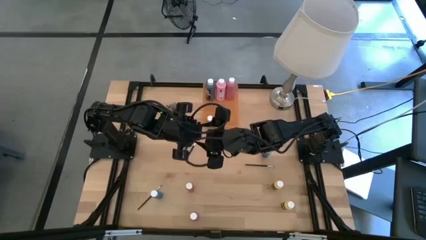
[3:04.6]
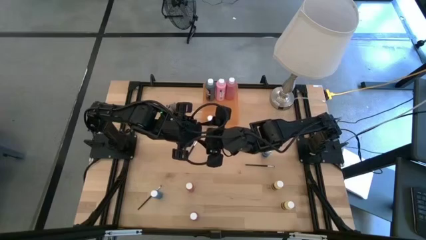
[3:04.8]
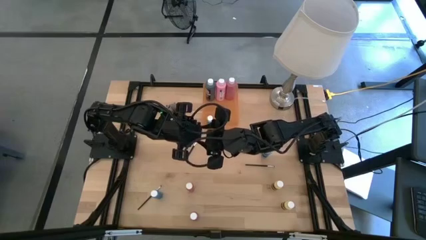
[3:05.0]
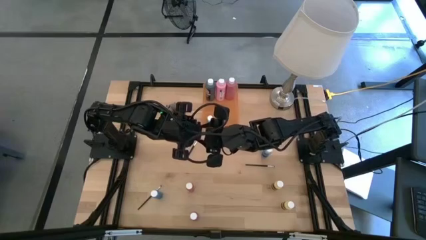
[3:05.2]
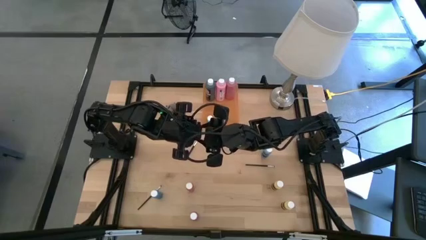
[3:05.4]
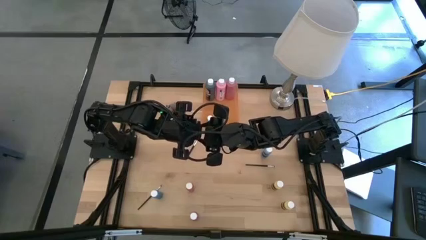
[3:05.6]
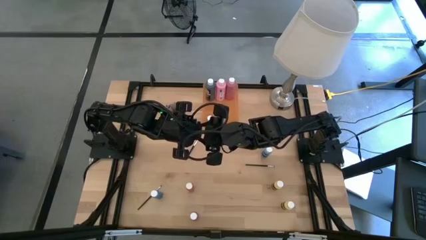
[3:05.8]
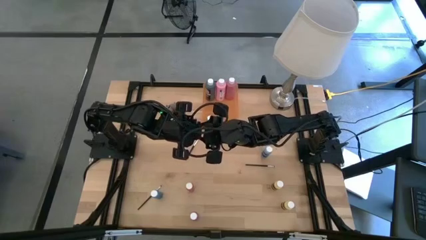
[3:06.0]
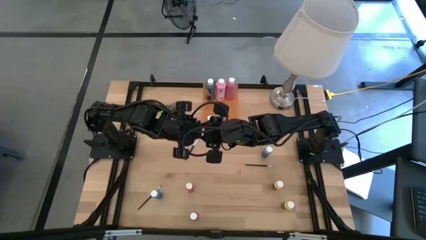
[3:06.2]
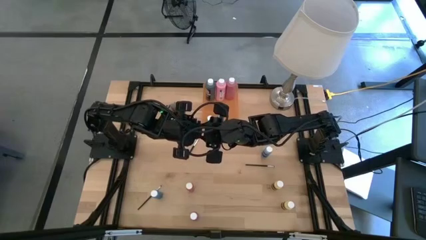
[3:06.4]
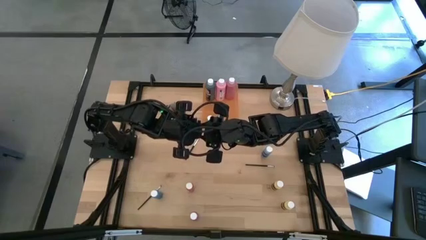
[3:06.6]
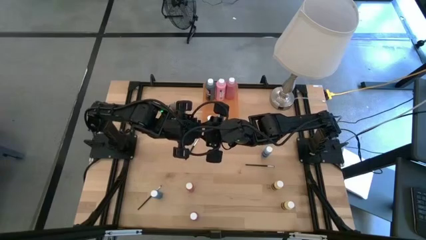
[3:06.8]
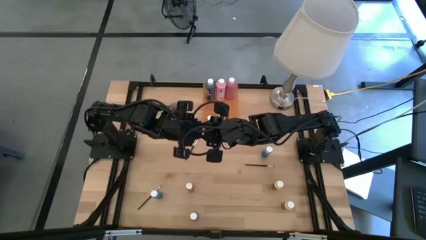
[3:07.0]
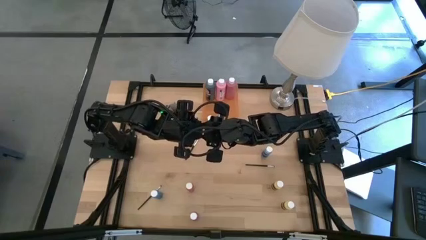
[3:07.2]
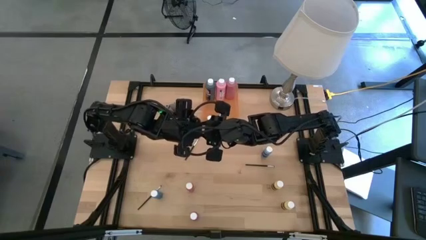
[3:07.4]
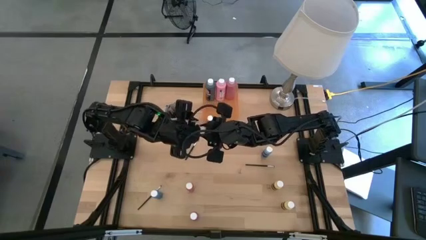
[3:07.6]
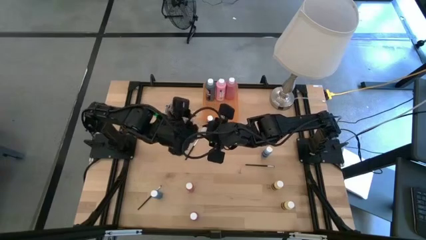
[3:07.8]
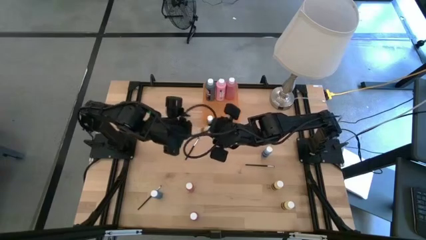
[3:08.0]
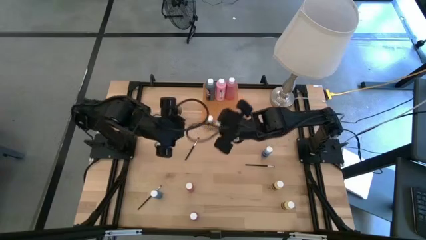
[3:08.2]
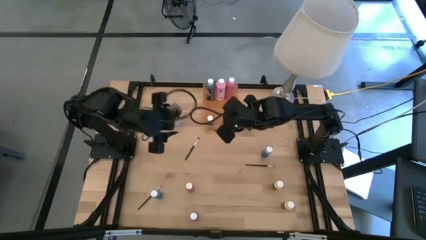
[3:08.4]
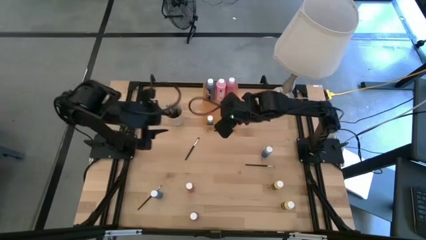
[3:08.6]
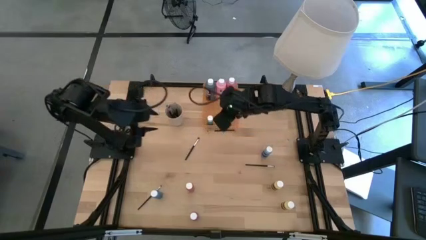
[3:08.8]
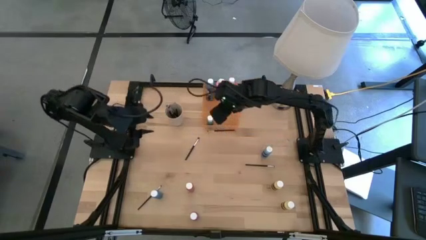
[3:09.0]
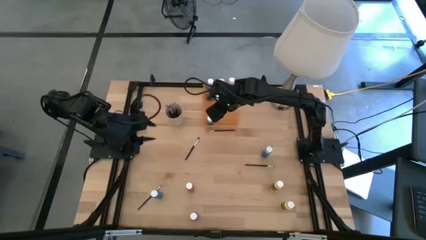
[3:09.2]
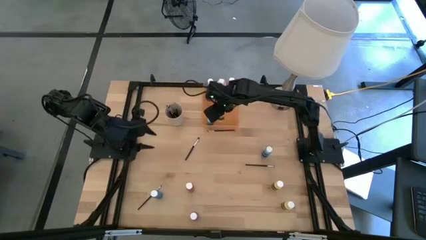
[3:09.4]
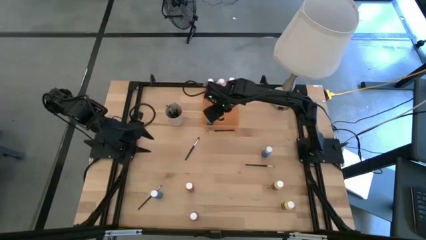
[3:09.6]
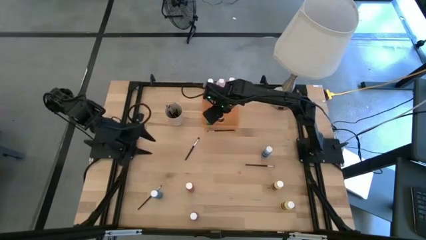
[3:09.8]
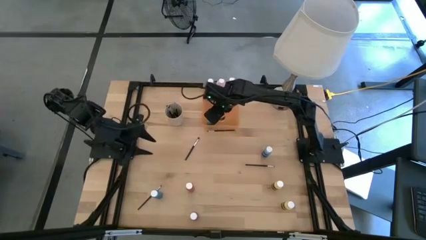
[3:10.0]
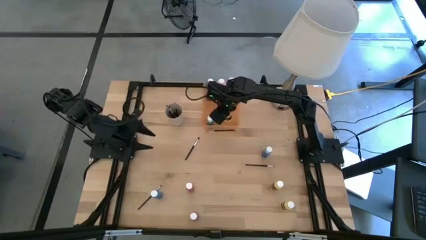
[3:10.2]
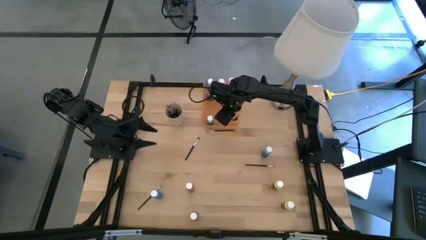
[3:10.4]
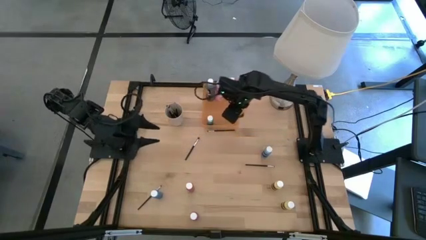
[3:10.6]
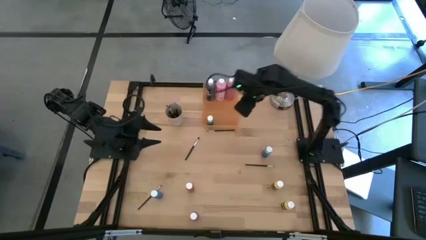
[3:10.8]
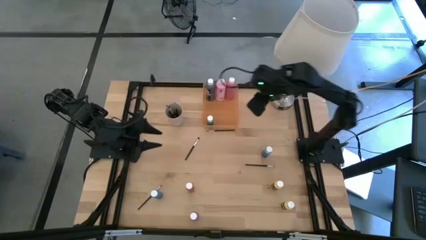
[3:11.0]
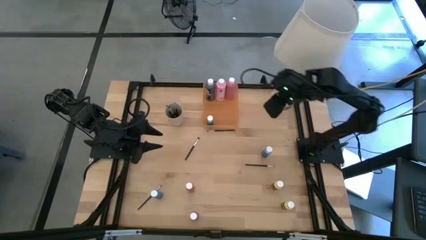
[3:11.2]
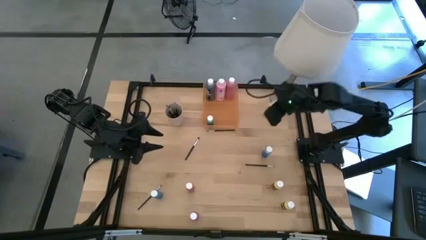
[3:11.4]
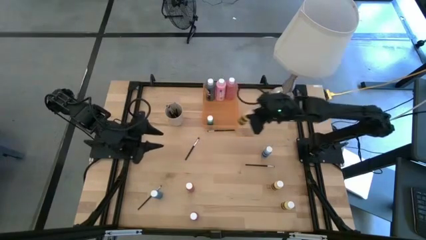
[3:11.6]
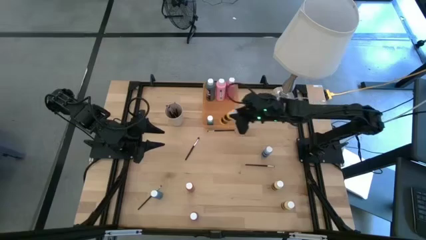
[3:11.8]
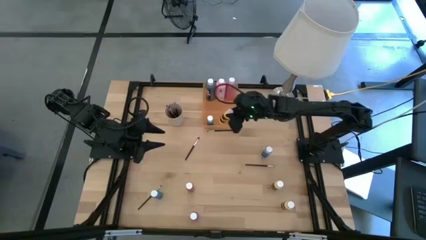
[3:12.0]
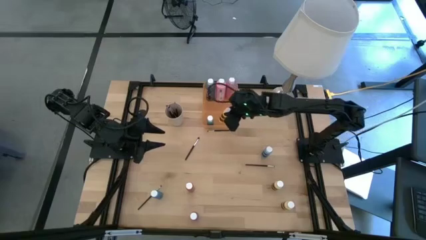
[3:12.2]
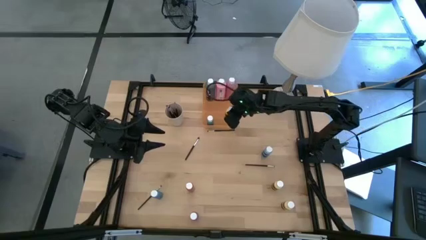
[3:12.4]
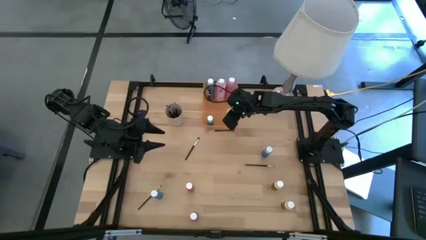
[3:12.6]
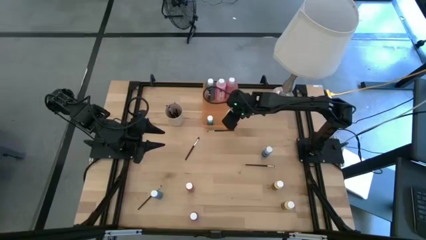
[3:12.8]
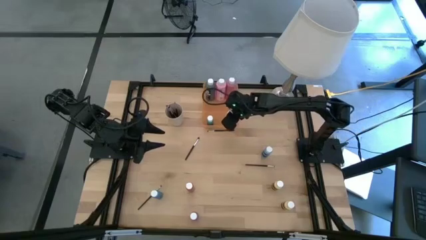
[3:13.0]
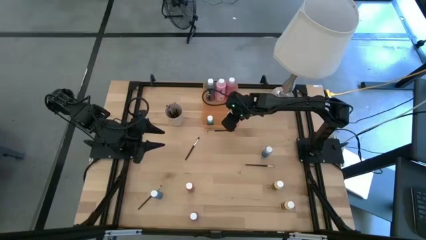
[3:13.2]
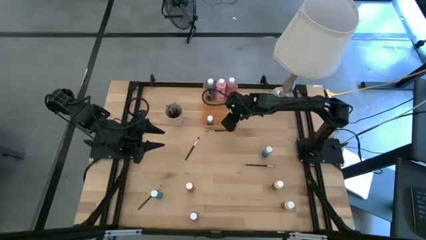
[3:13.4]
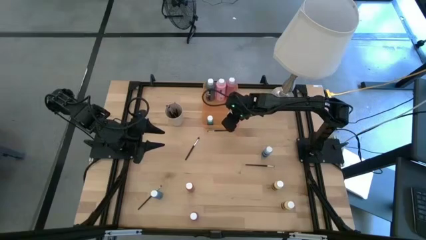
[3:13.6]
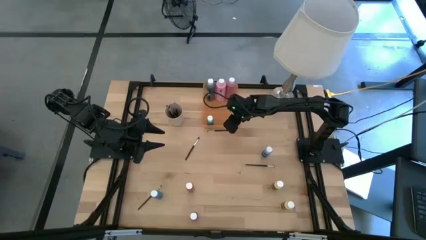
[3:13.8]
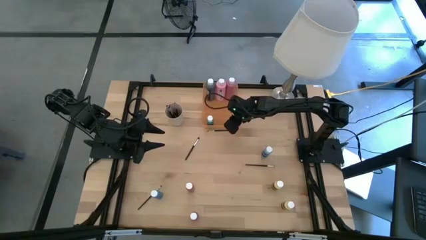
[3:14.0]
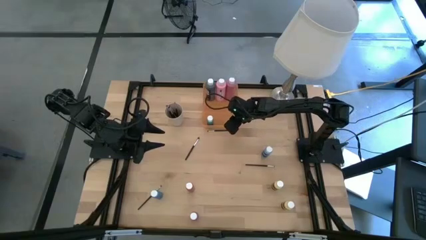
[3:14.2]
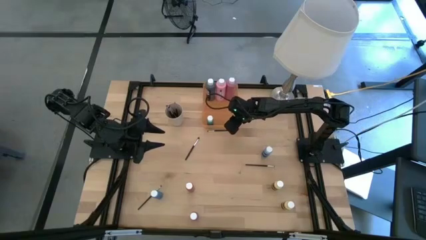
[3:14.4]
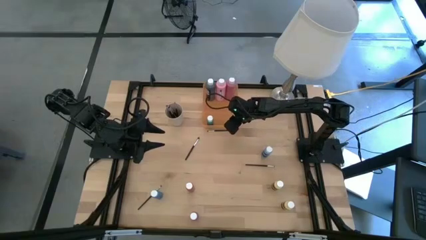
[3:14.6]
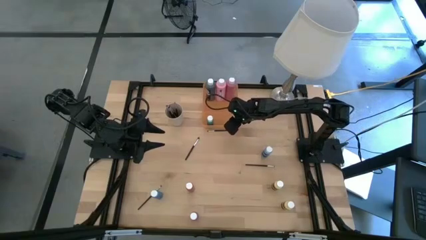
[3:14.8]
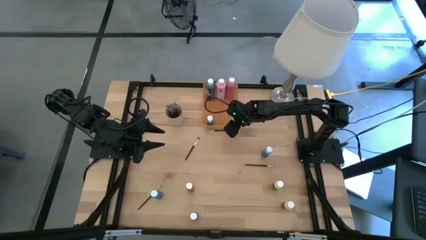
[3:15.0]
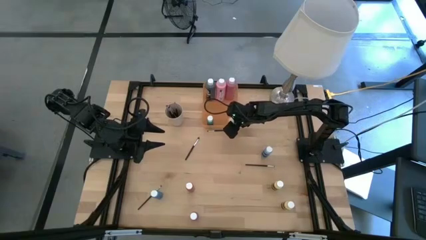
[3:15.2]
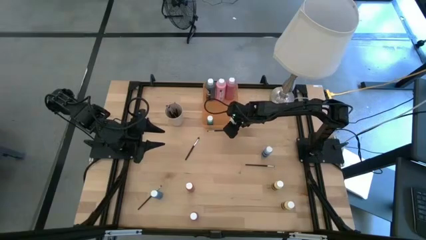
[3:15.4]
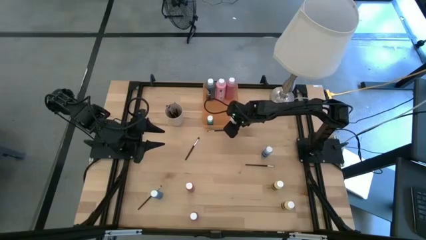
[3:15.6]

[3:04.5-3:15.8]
Task: Pick & Place Paint Supplies
Put the yellow paint bottle into the orange bin

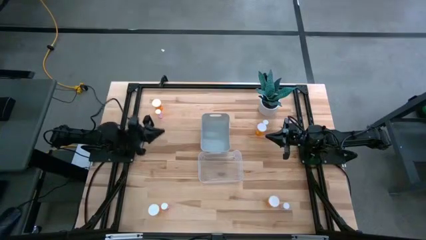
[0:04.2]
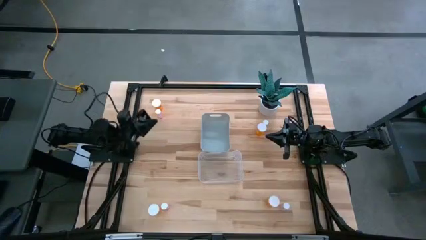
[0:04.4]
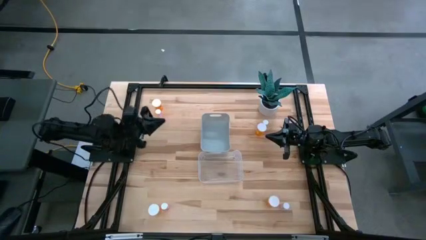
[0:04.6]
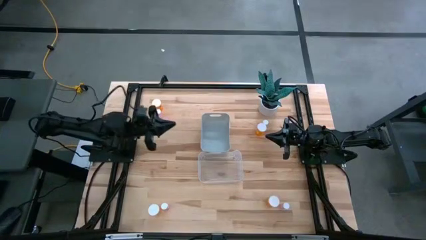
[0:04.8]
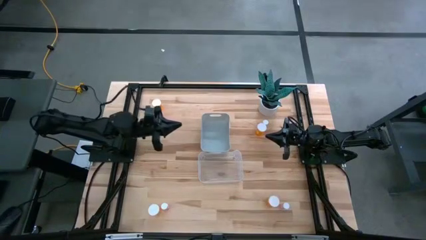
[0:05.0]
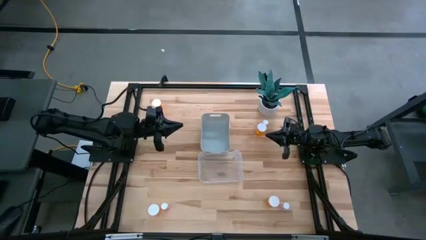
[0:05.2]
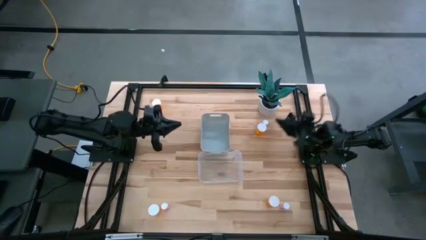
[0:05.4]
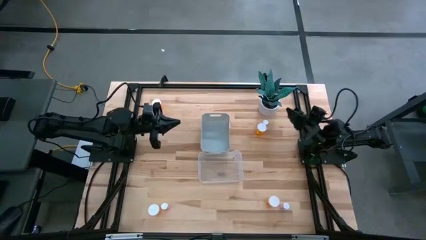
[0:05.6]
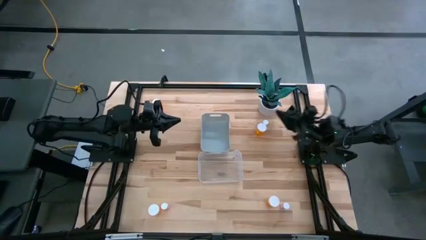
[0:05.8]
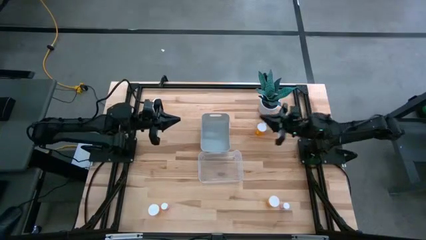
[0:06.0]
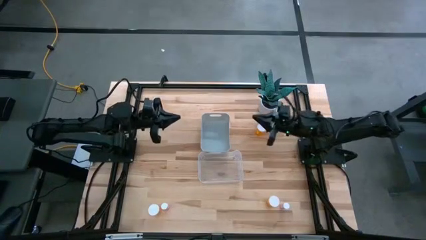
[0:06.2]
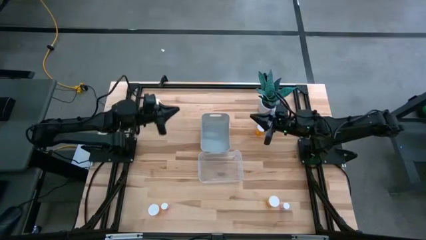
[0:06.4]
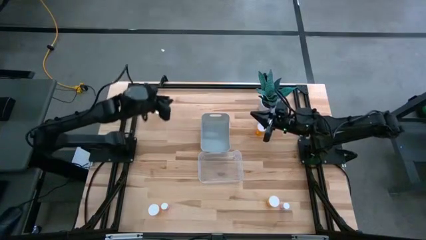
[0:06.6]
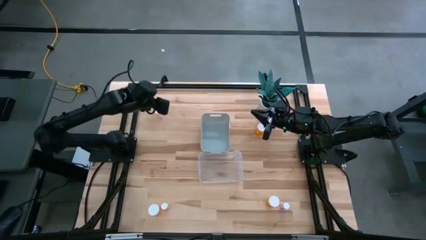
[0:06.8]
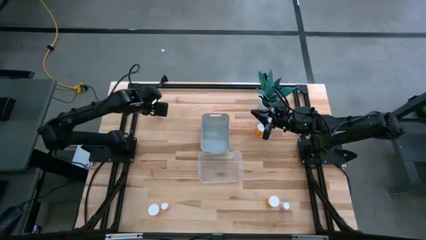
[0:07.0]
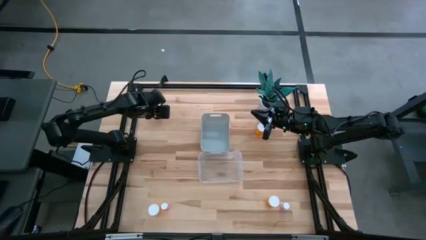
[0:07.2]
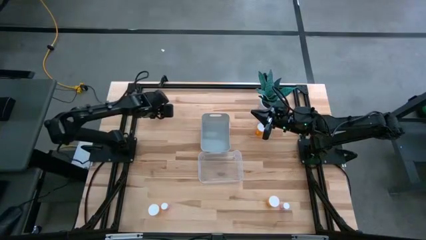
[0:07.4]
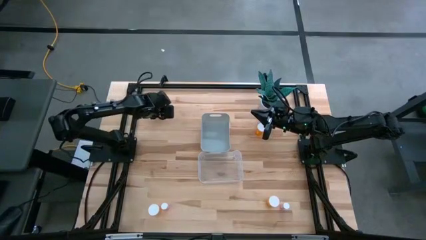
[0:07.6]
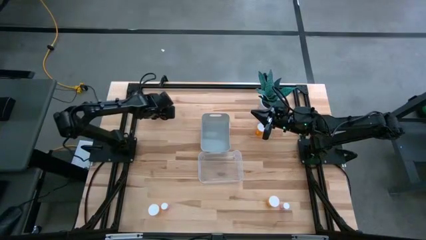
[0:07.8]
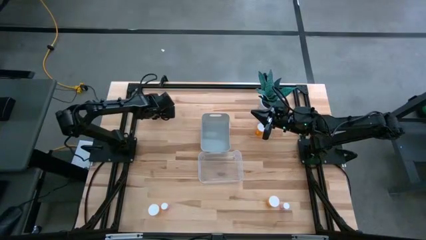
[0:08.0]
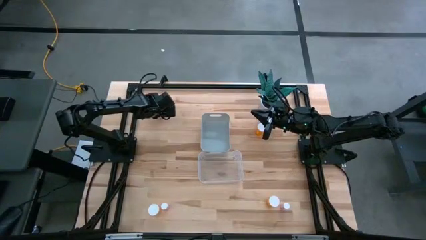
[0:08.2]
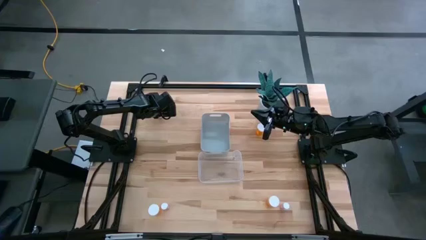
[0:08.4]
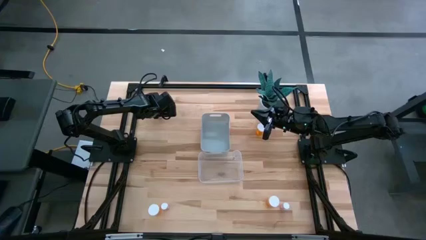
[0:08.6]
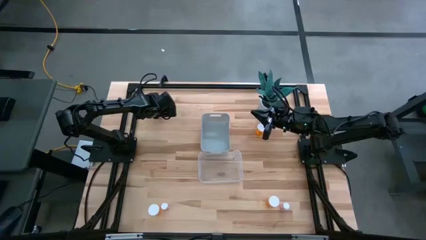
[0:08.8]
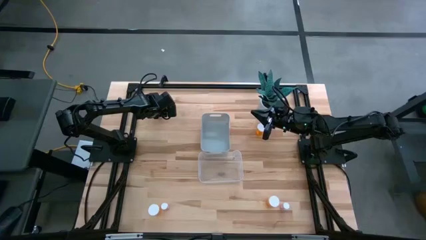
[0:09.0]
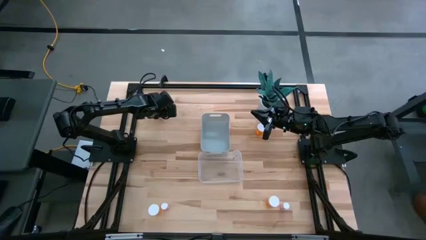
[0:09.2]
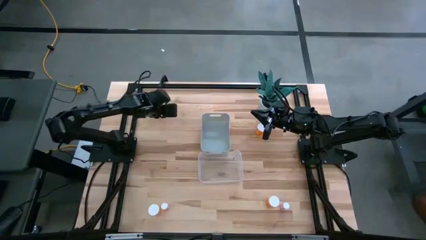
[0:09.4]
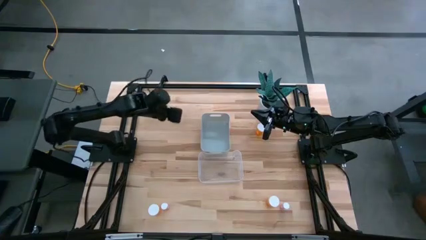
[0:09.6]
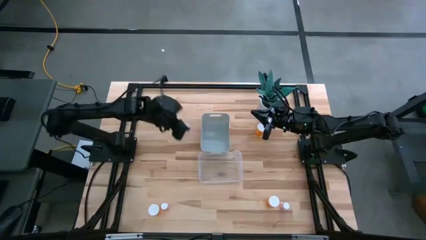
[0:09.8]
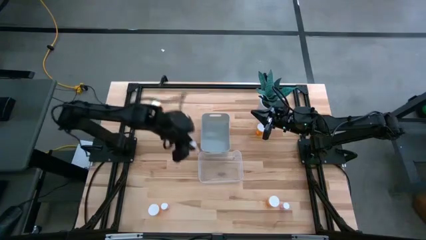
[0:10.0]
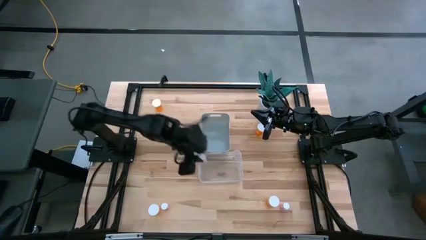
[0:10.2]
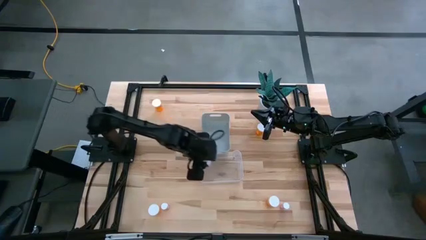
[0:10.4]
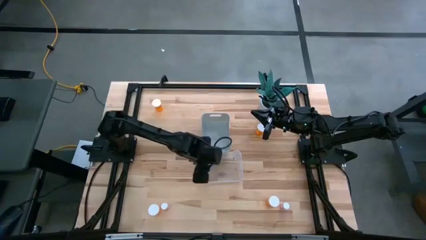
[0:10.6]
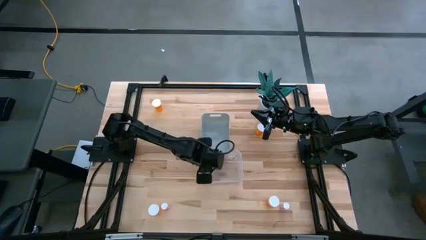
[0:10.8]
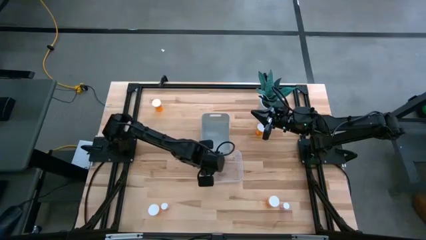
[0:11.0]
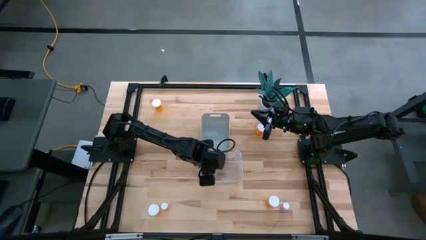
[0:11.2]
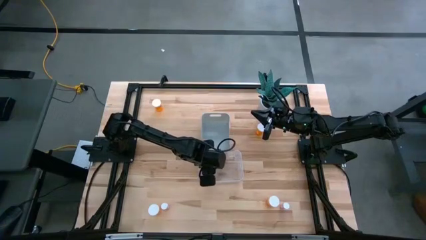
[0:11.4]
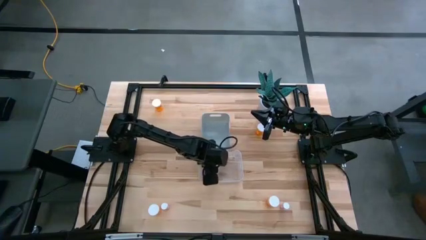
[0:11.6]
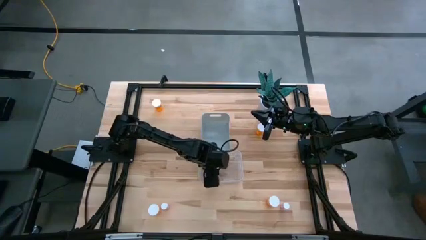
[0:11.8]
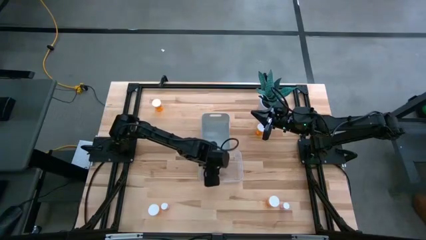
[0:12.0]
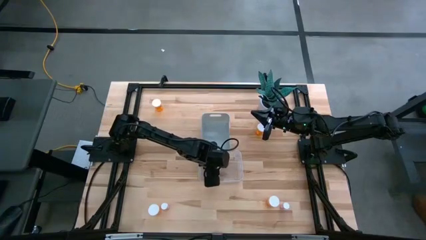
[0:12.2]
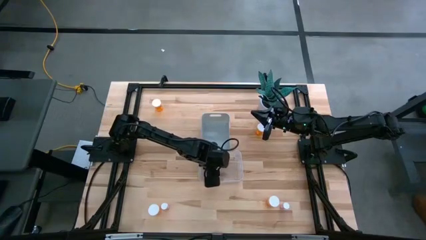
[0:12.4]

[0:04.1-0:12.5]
Task: Pick and place medicine bottles into bin by pill shape (circle, oval)
Put the top left pink pill bottle into the transparent bin
